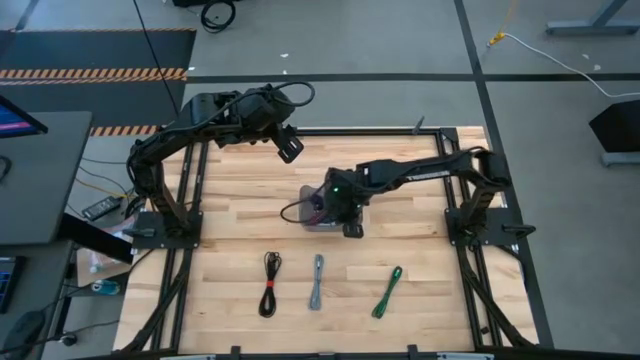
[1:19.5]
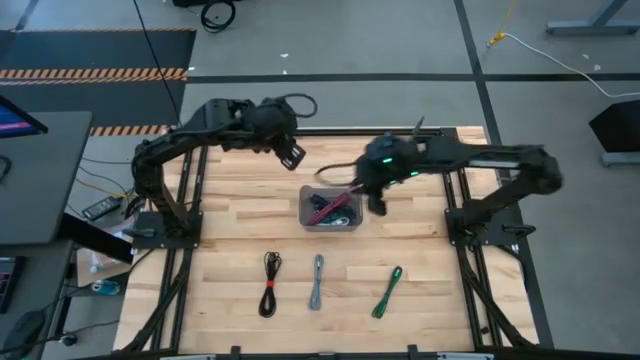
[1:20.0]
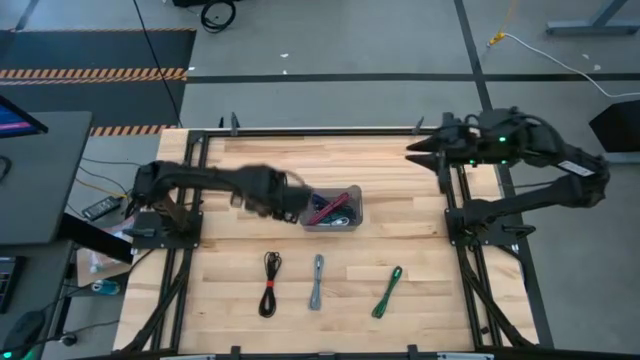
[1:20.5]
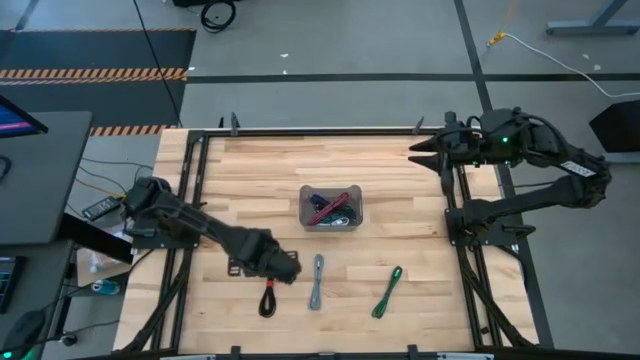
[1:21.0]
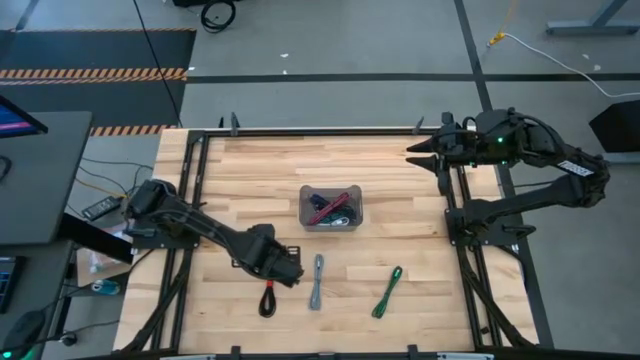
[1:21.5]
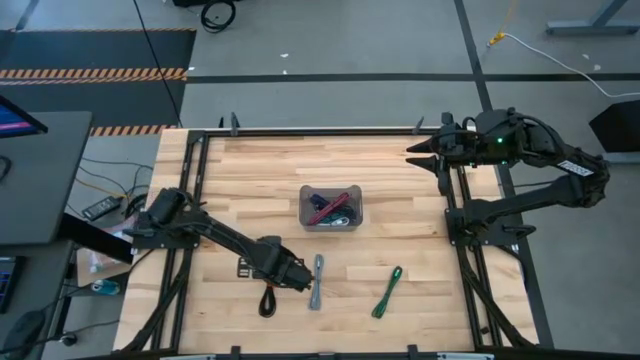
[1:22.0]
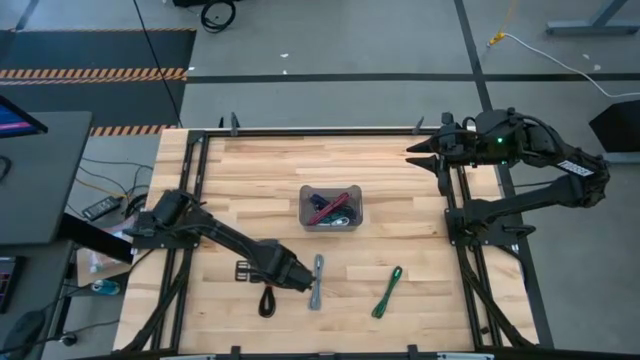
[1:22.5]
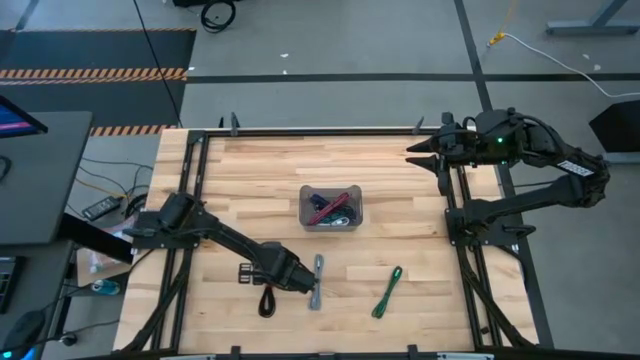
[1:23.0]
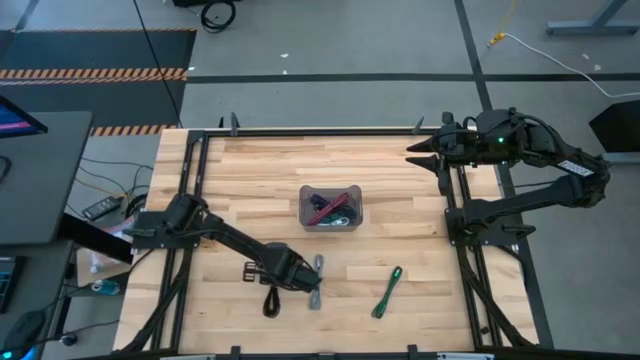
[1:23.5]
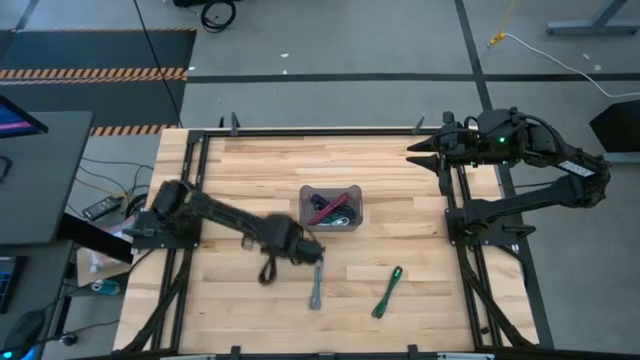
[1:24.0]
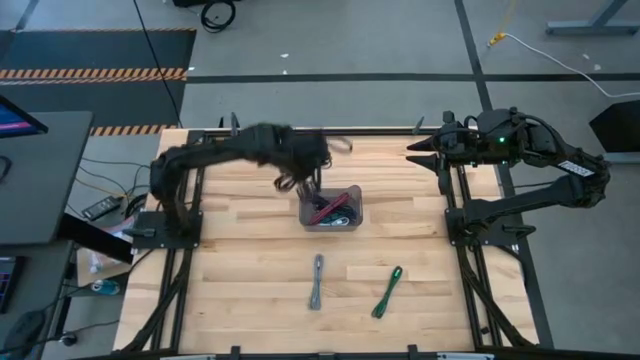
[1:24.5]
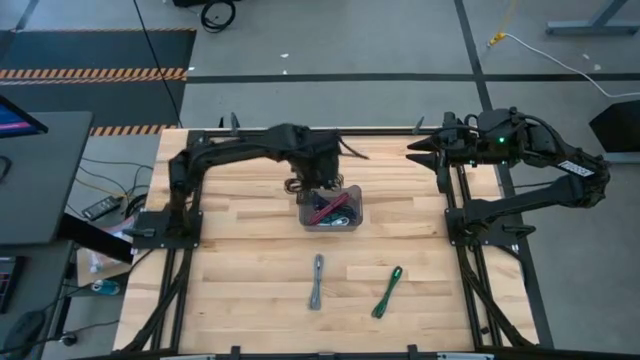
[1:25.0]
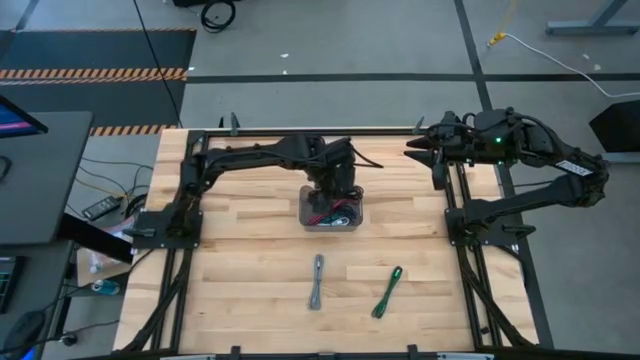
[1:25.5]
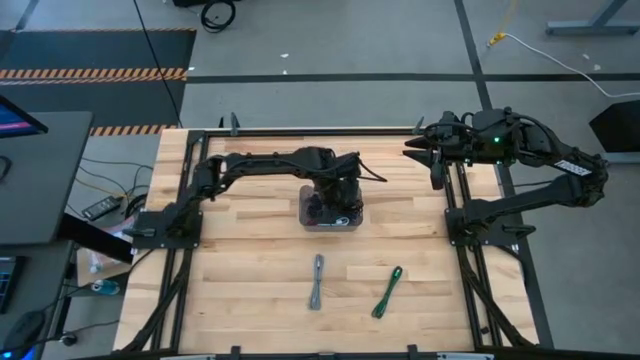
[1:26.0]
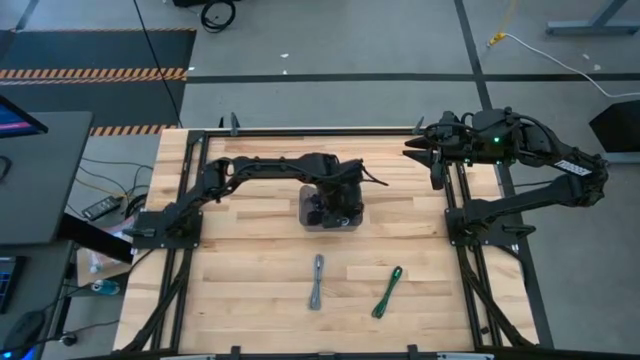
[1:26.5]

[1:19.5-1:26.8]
Task: Pick and place USB-C Cables
Put the black charger cable into the black bin

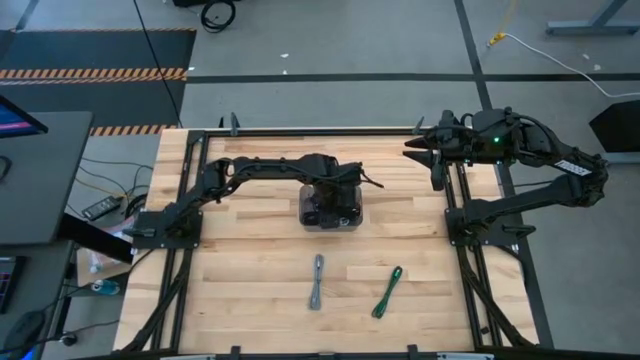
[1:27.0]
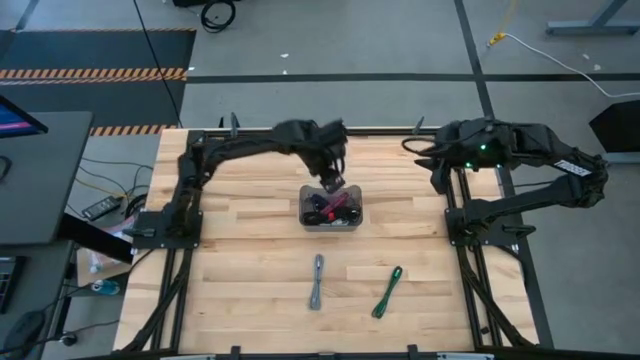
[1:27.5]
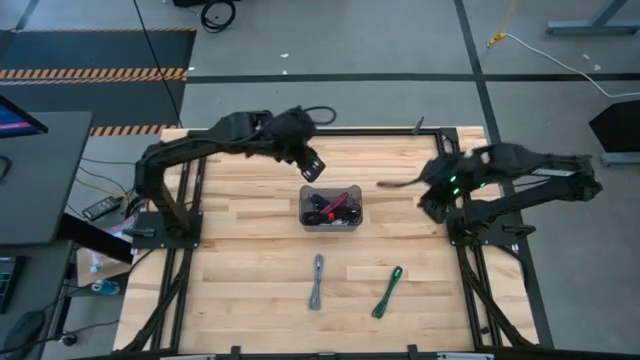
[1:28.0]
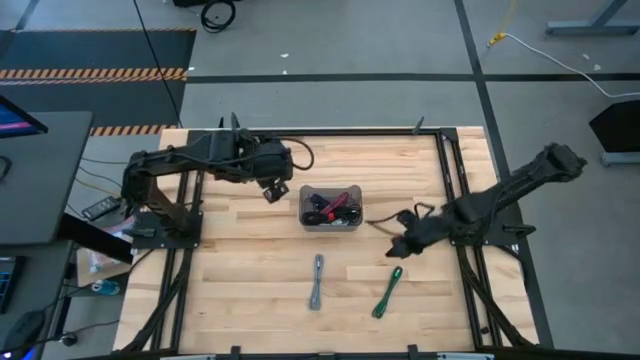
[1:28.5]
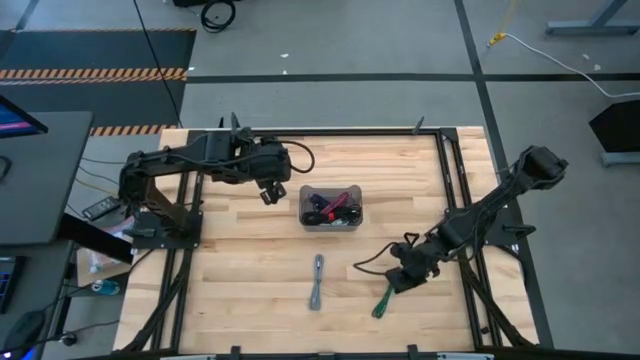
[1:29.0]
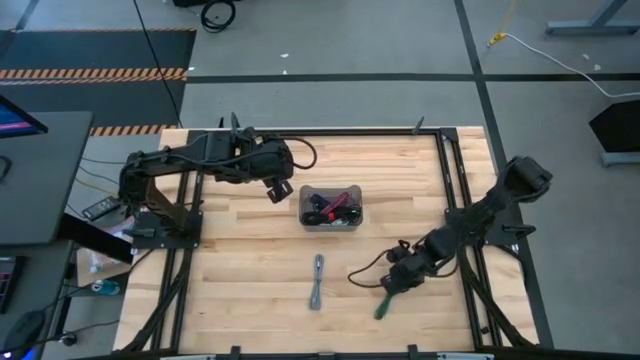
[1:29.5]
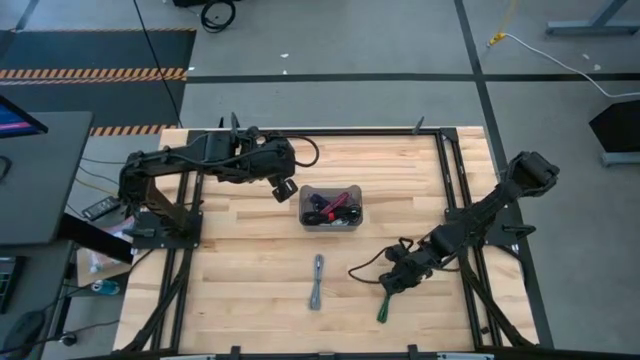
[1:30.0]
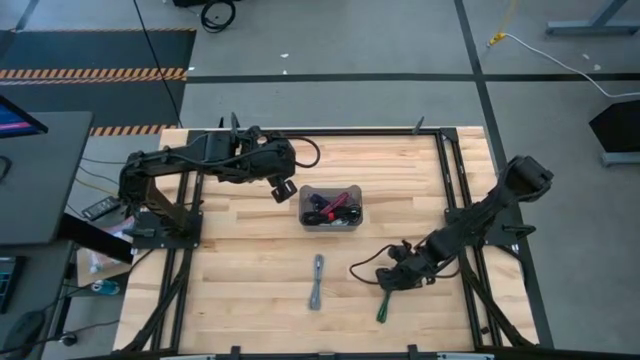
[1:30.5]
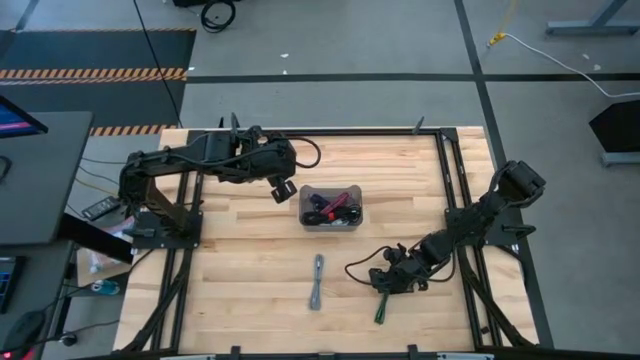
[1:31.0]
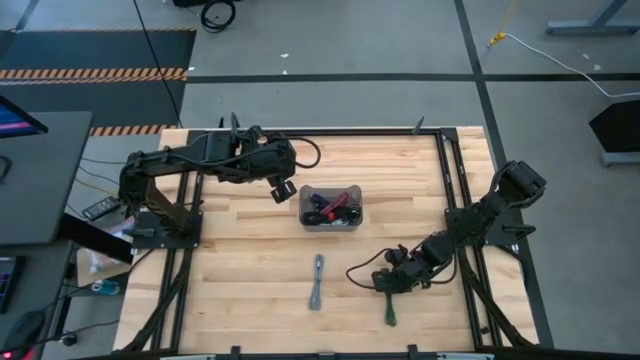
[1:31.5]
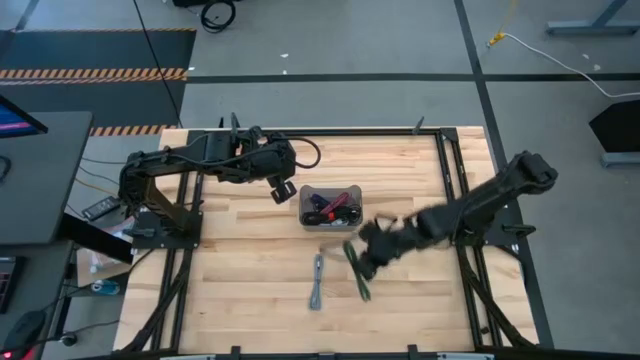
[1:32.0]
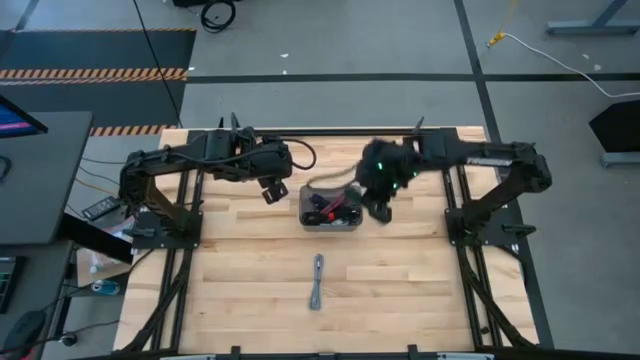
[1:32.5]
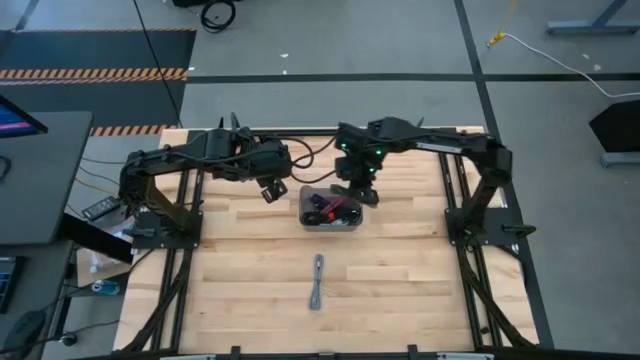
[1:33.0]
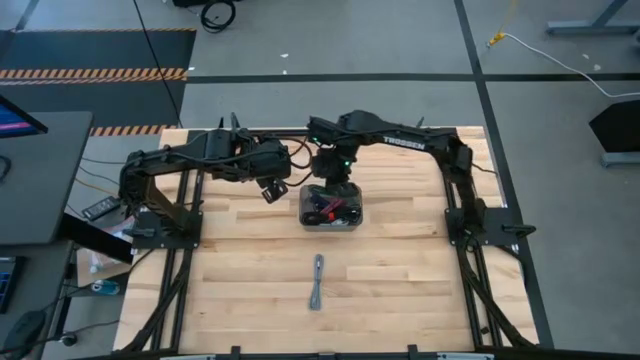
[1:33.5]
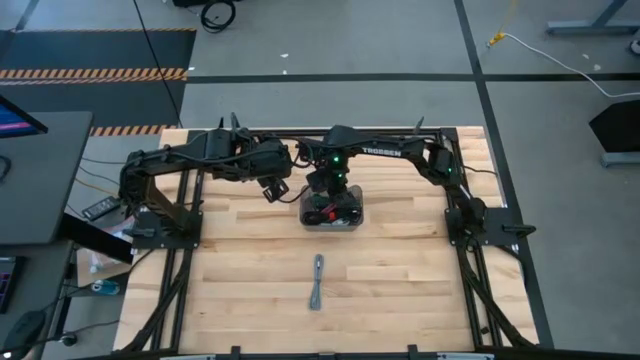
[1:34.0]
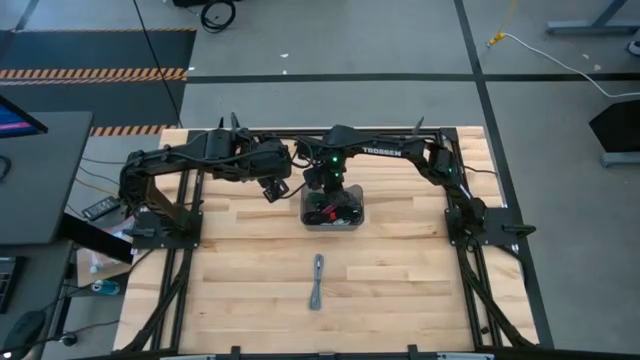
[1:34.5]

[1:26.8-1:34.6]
Put the black and green charger cable into the black bin

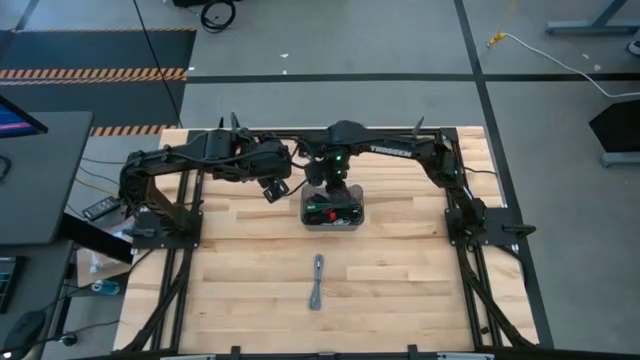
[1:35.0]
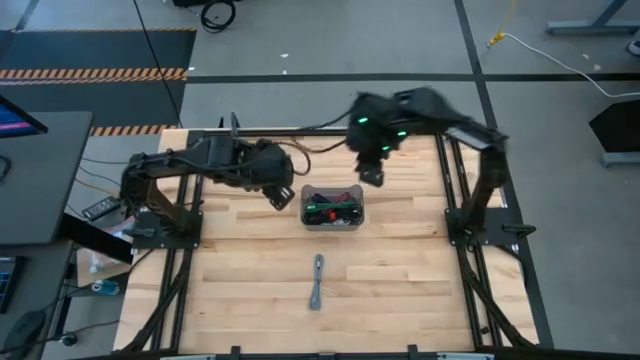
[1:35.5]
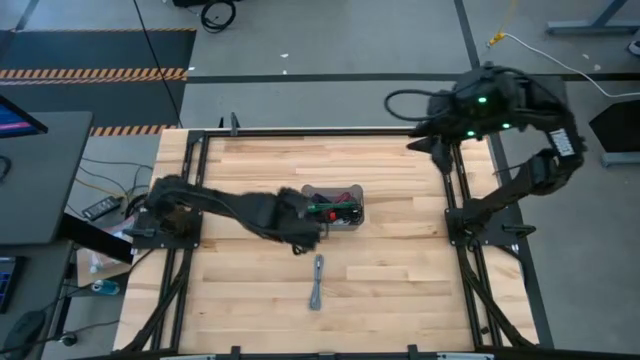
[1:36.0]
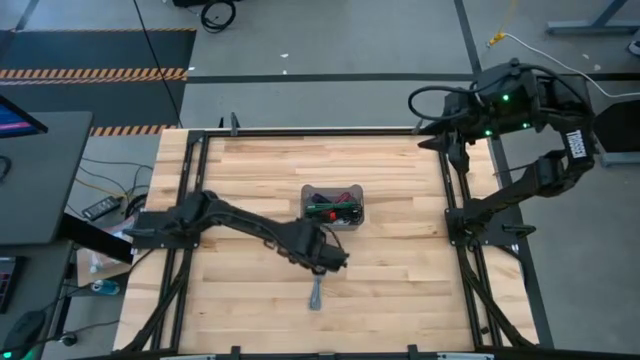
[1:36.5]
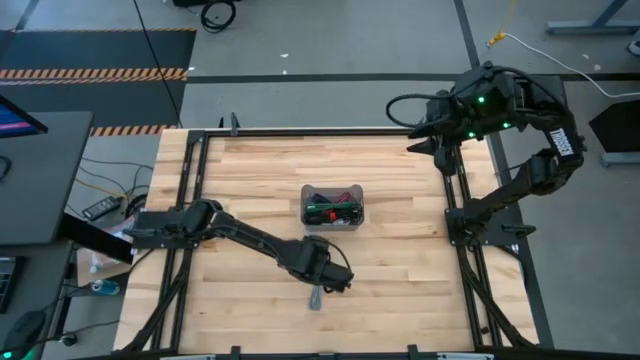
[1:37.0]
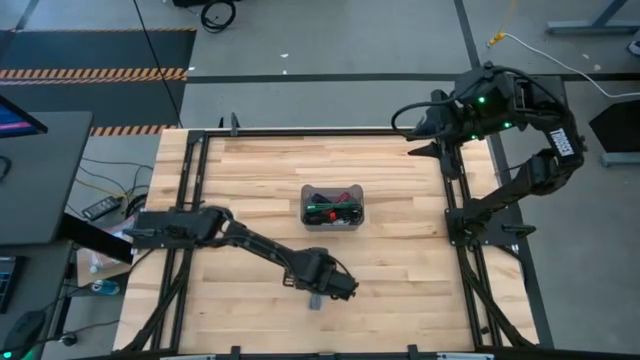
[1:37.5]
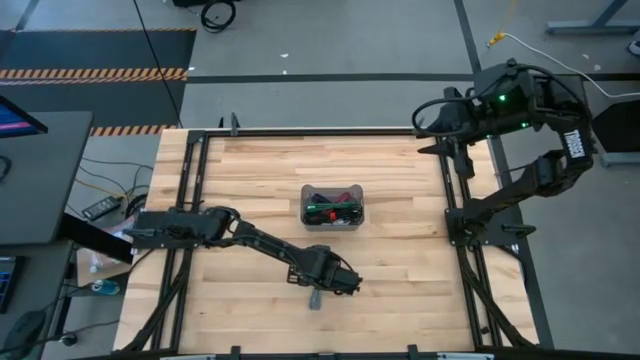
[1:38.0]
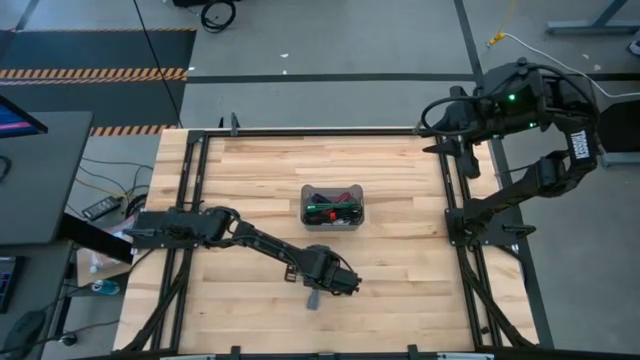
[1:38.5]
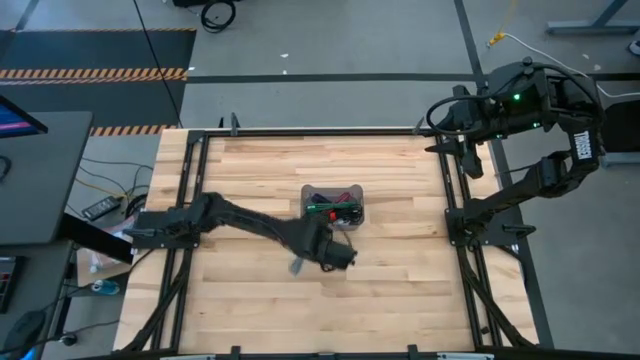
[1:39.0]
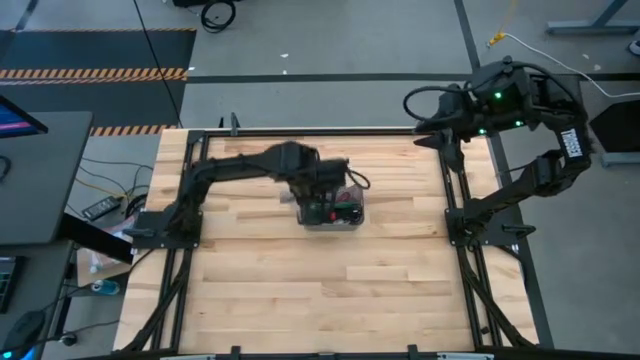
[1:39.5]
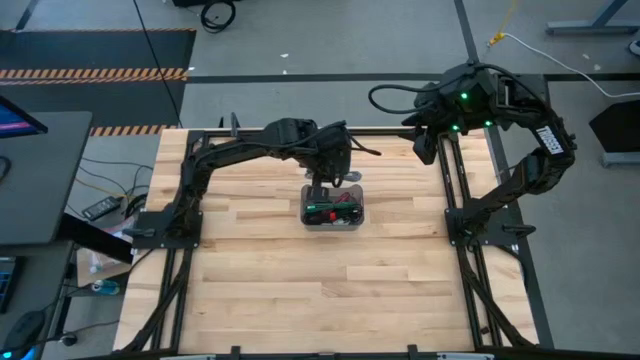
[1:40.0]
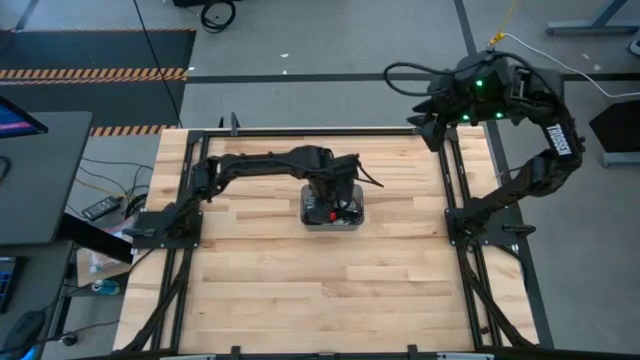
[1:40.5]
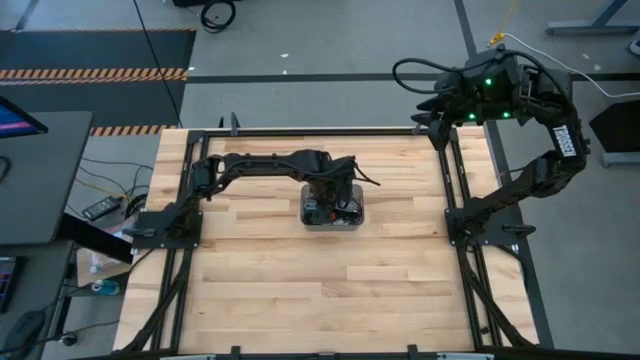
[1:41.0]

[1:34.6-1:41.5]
Put the black and white charger cable into the black bin
